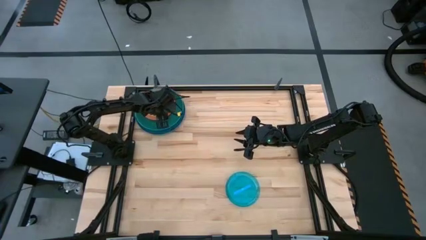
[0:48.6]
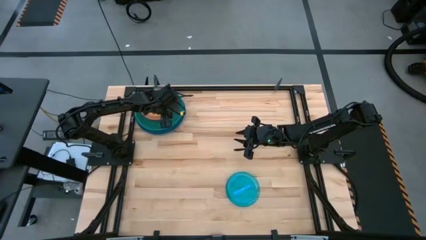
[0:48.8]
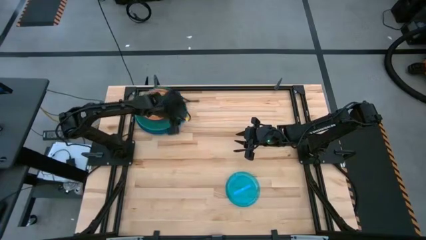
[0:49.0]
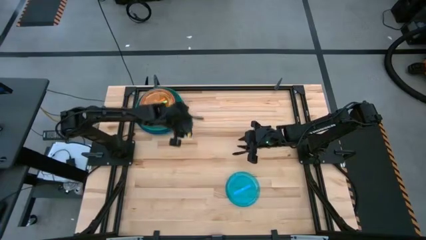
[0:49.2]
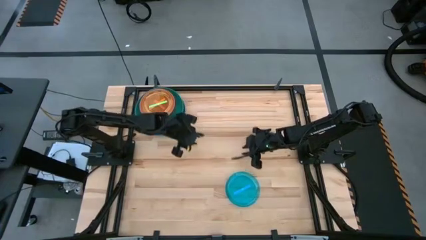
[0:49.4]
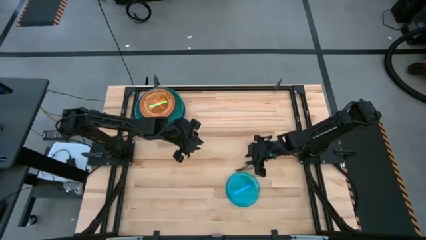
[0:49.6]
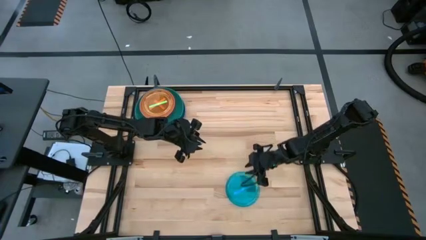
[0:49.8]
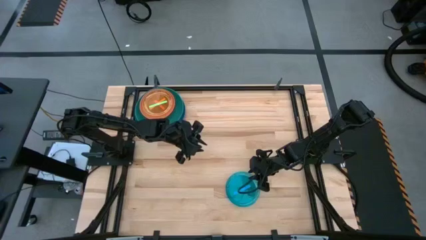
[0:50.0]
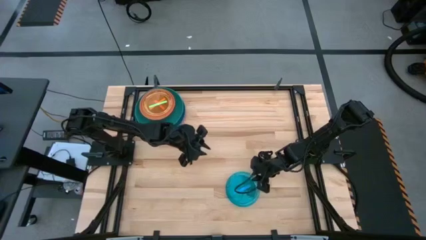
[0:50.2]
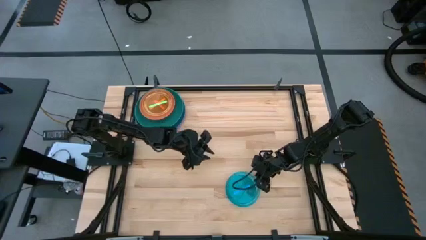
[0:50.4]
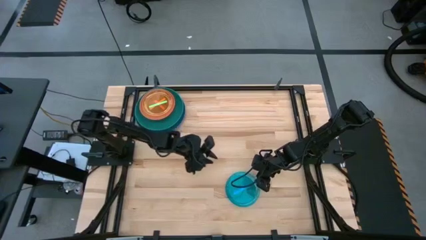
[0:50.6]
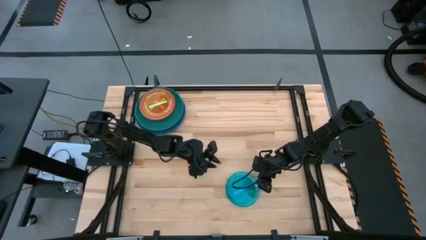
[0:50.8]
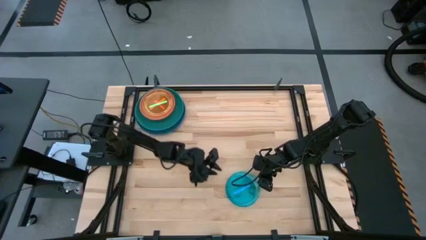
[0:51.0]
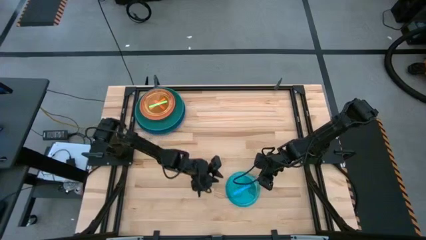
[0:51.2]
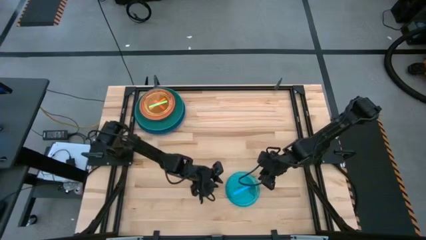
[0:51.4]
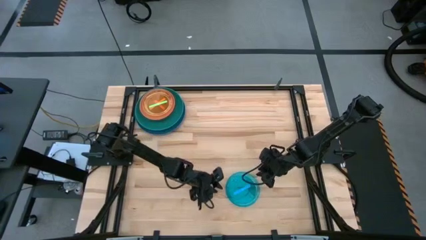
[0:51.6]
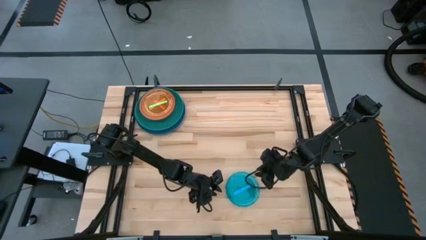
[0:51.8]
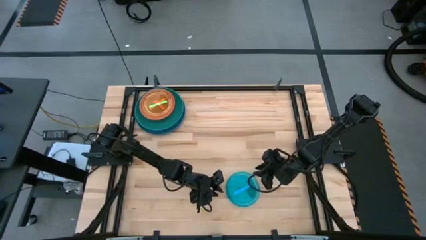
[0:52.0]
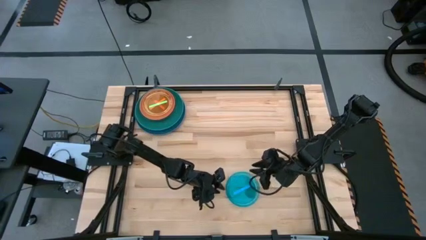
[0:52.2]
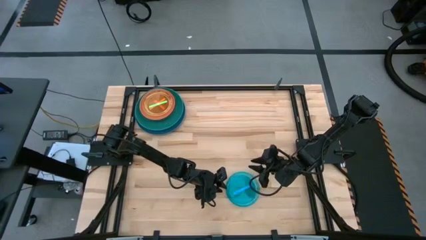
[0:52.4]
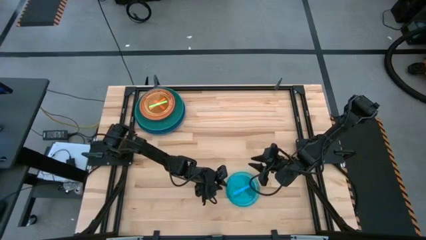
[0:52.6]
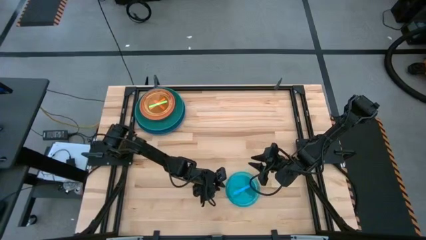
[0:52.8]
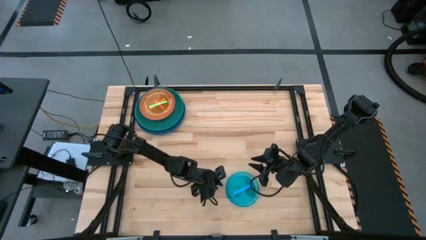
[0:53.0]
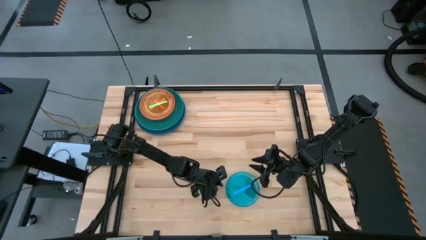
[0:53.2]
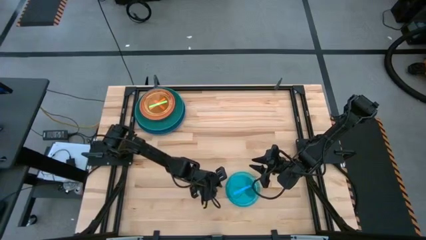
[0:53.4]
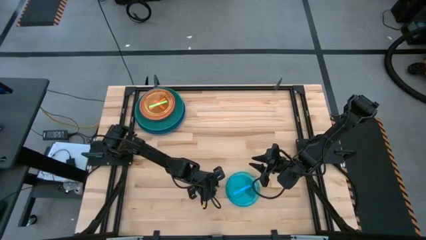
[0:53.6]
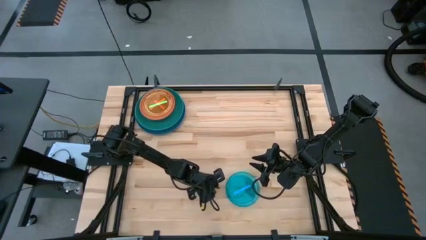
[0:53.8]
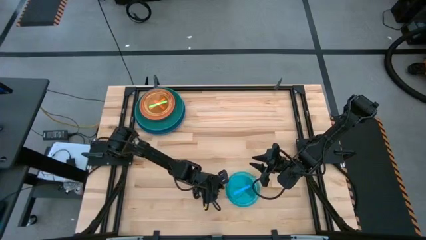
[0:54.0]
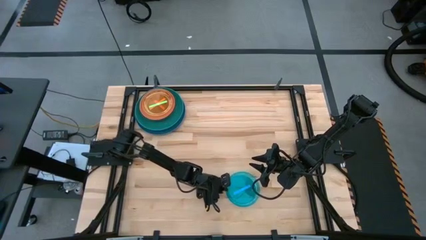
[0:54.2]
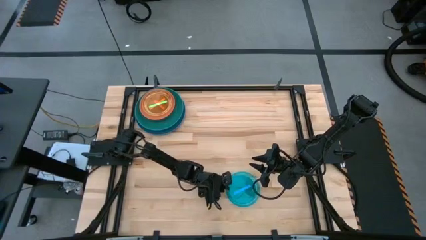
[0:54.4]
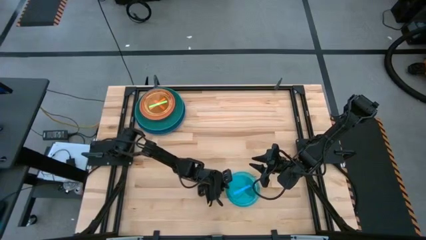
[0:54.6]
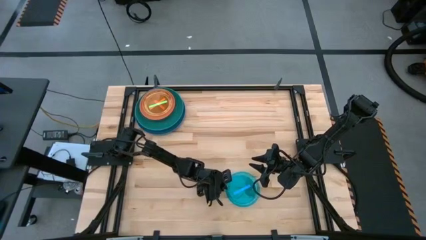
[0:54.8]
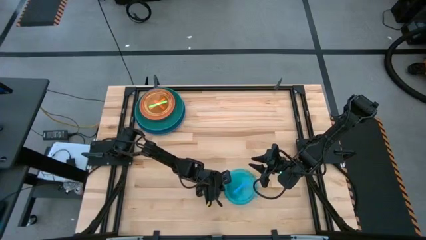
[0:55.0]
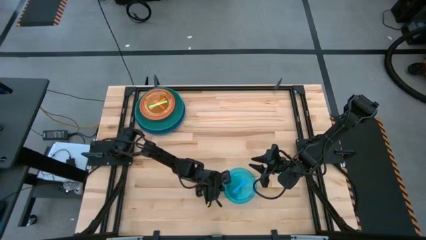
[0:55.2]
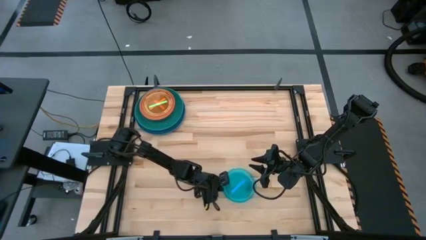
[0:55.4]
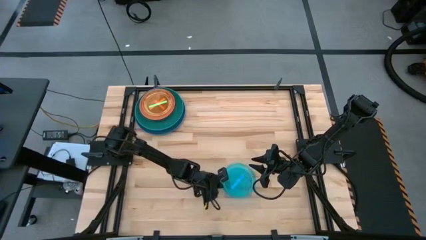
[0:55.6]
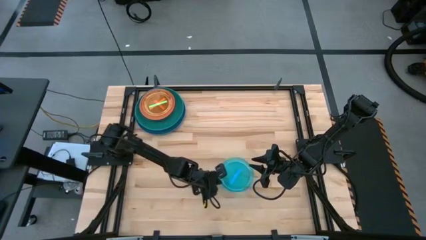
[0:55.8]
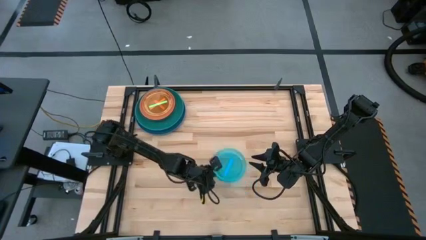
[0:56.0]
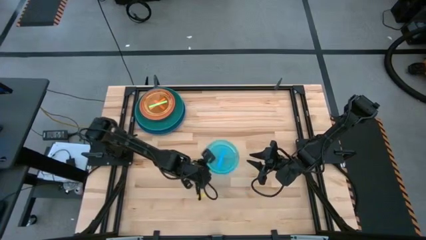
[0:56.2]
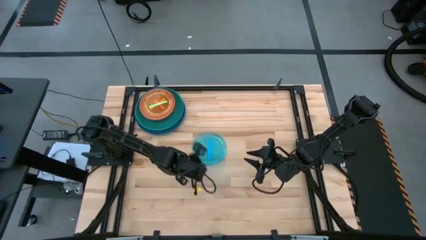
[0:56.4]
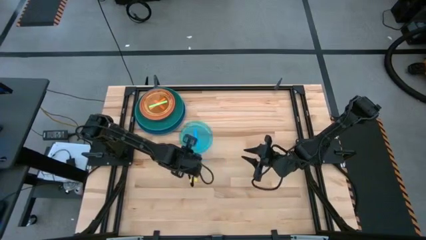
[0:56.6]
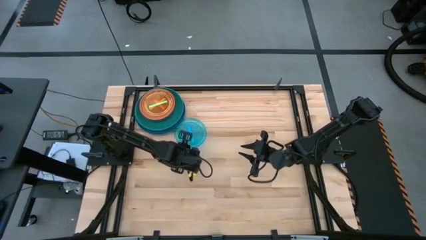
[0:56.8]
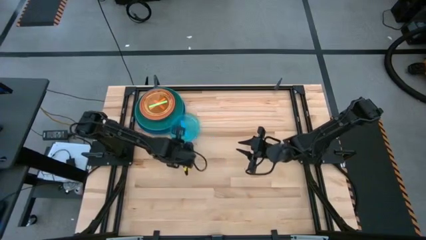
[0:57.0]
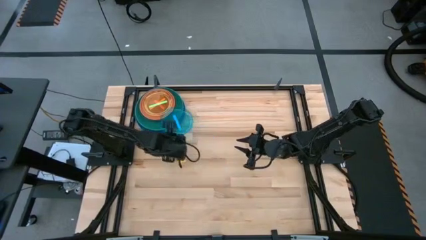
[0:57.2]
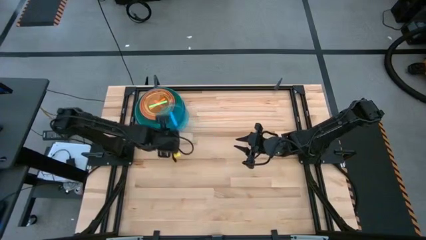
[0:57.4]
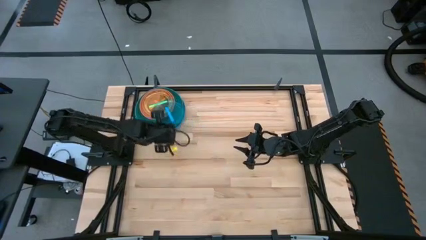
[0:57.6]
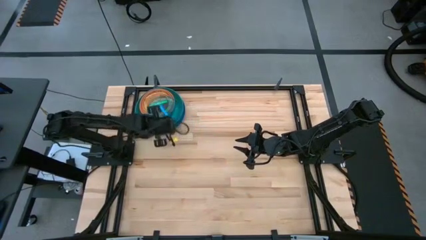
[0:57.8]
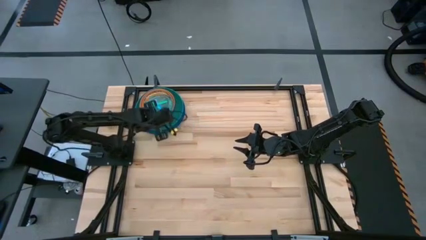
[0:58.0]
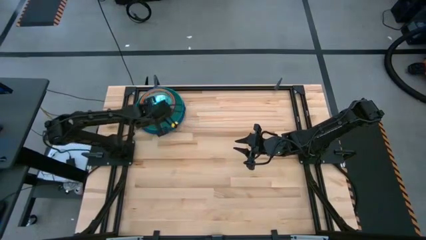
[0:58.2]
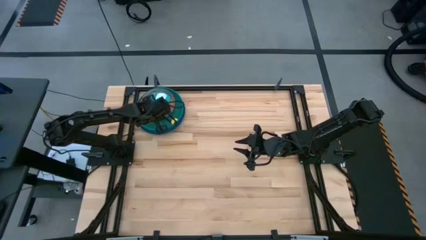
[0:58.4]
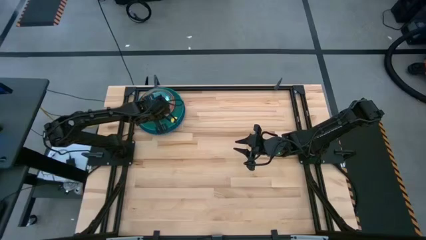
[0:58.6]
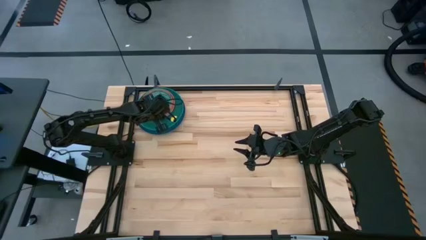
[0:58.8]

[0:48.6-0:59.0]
Task: Stack plastic plates
Stack the small blue plate on the small green plate

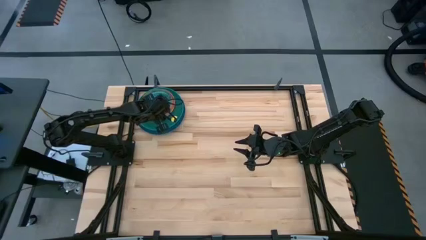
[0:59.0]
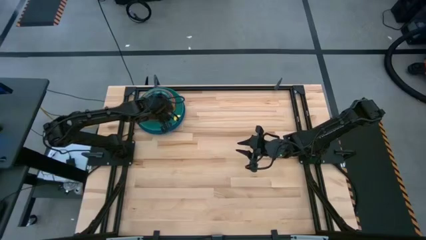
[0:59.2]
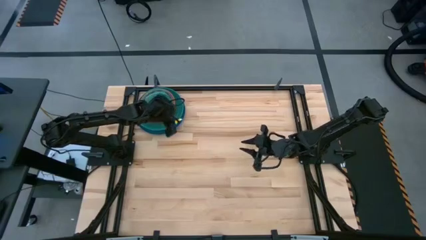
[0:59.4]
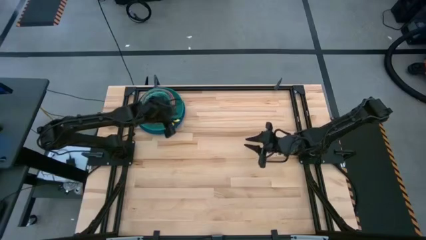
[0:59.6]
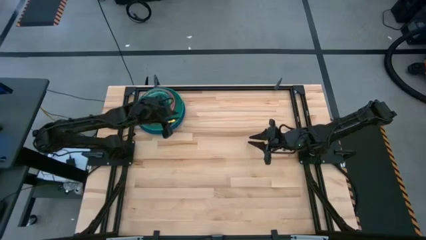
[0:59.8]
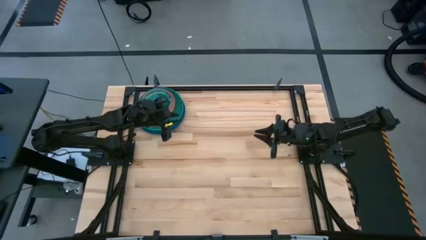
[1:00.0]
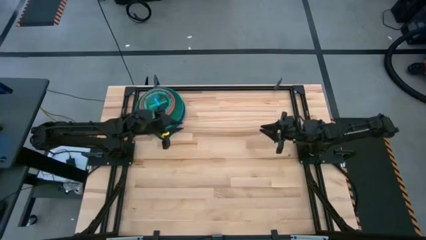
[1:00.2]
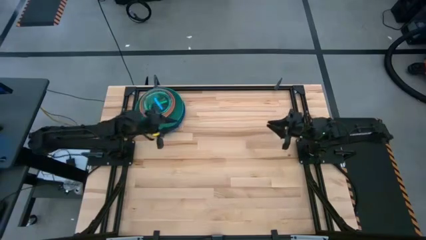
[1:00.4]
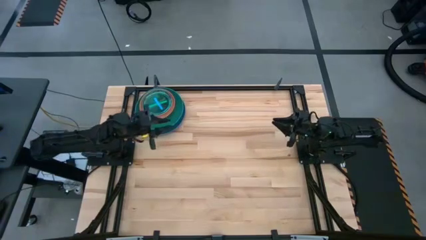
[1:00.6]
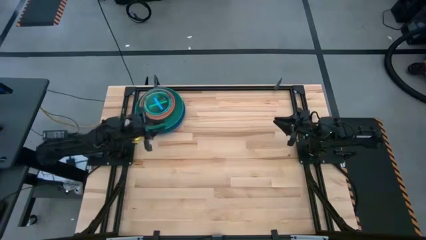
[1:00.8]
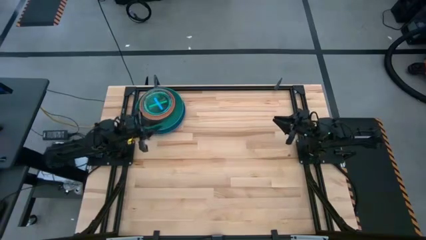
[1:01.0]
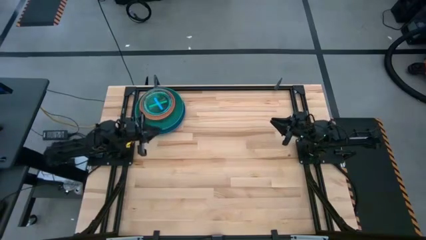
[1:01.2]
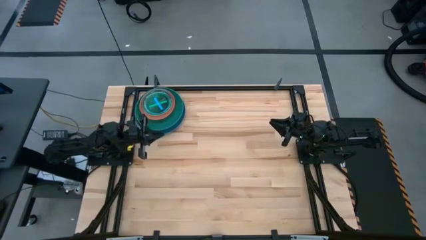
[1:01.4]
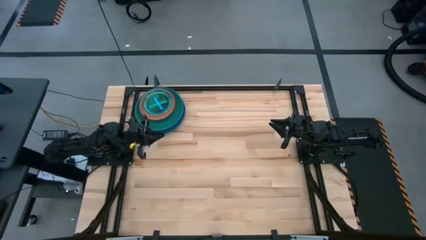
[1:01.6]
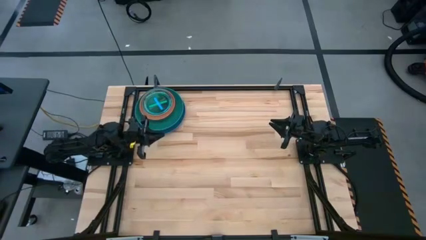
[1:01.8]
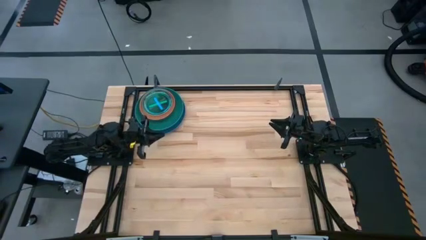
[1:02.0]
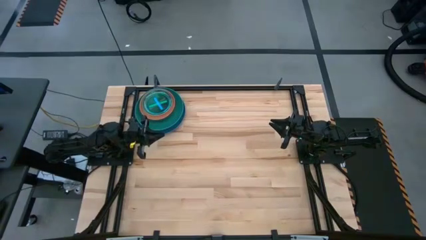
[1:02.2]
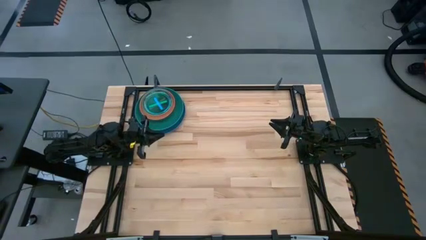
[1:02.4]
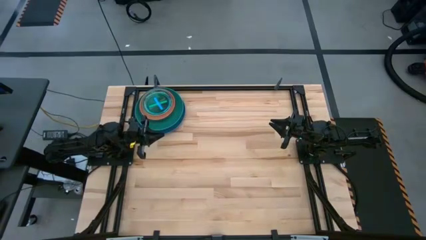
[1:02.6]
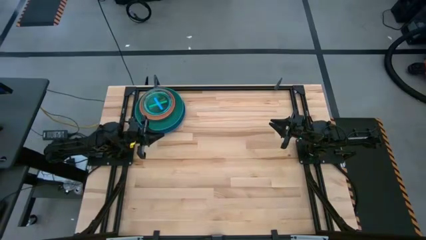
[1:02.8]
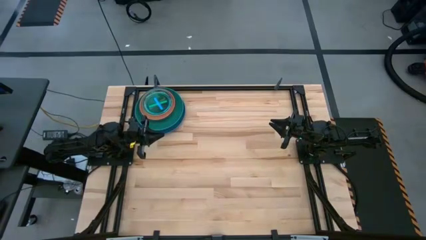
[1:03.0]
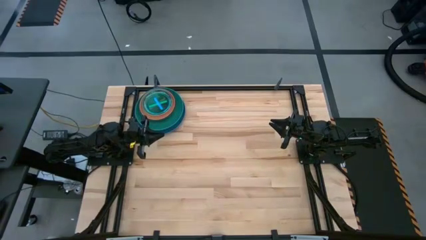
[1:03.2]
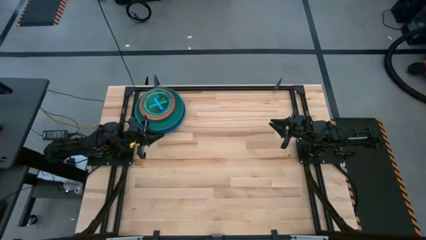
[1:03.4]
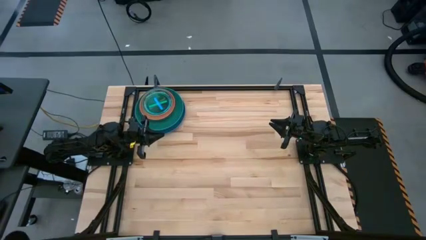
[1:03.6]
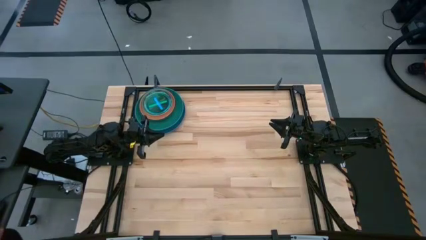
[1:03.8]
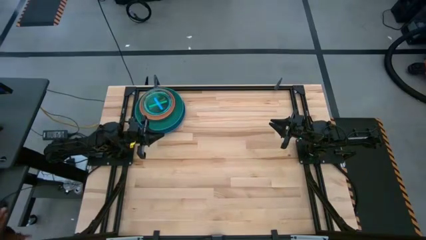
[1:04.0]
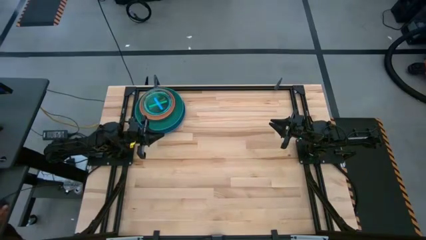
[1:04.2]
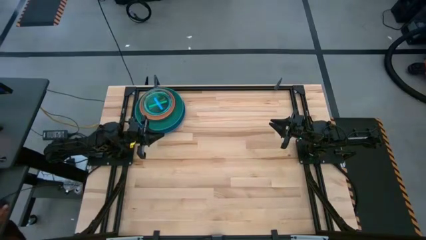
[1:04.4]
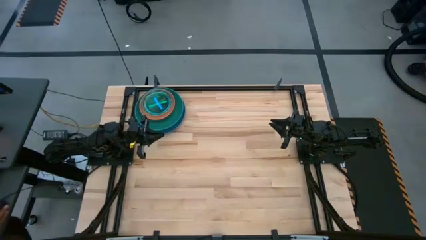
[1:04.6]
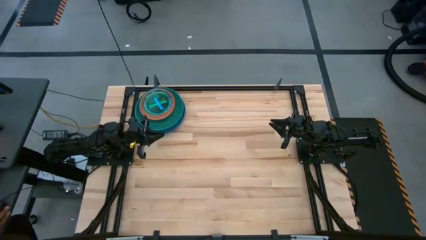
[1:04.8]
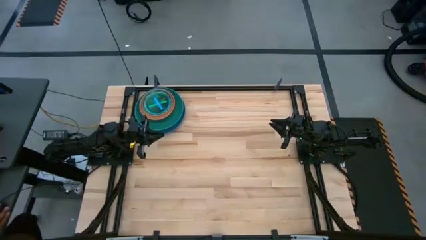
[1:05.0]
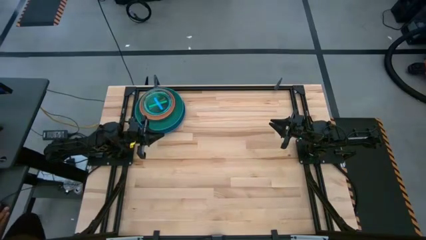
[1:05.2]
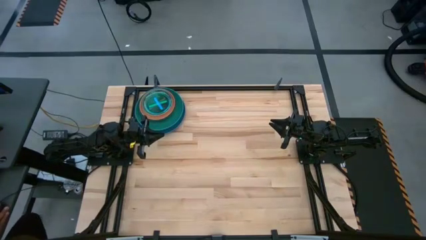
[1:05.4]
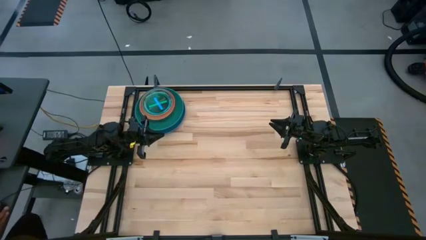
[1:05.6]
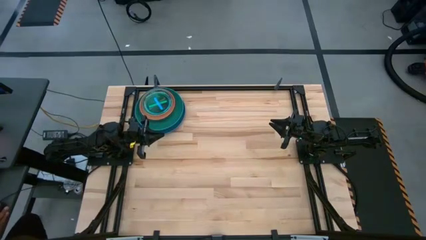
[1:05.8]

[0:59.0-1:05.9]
Return to Home Position
